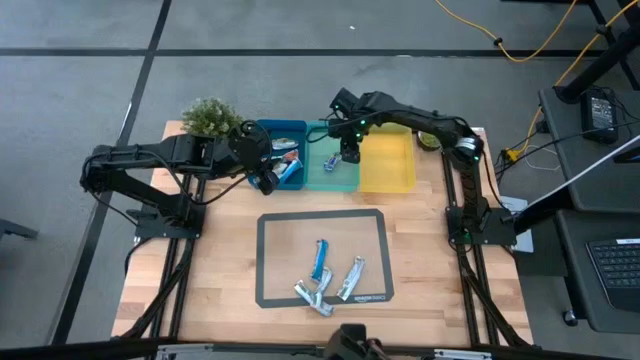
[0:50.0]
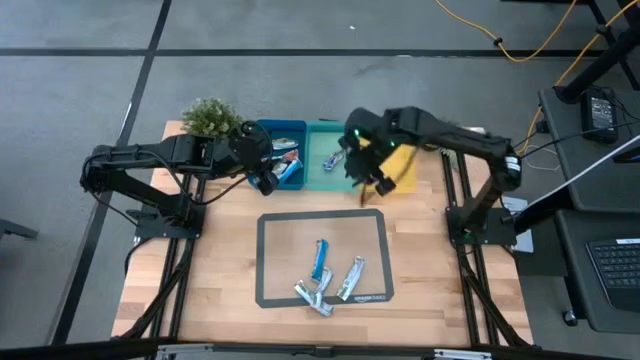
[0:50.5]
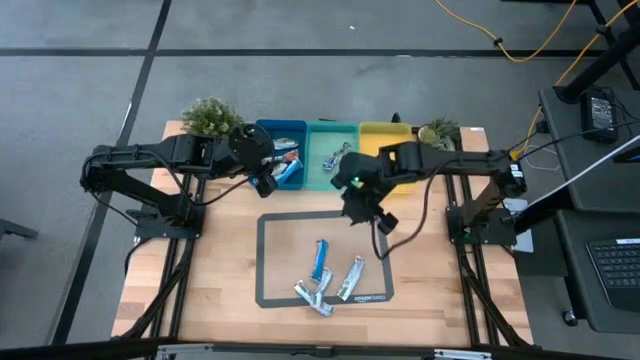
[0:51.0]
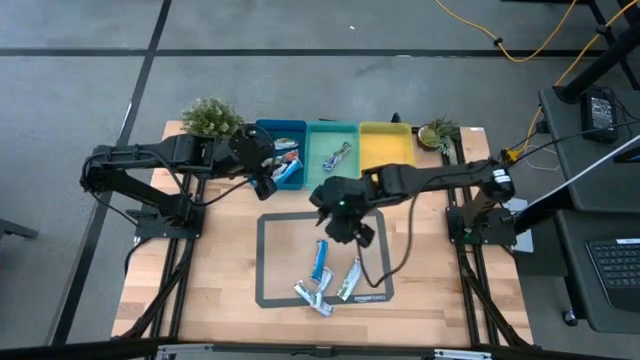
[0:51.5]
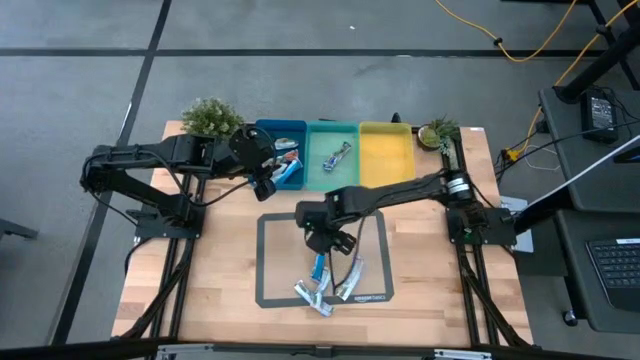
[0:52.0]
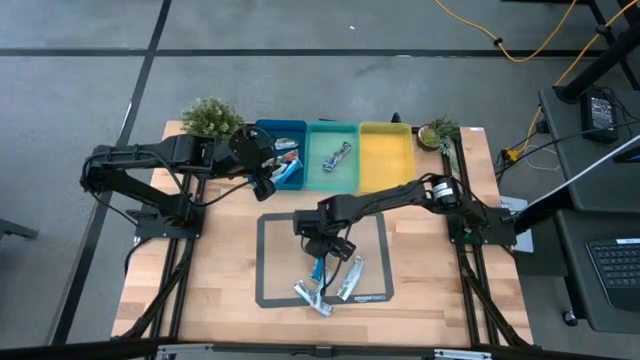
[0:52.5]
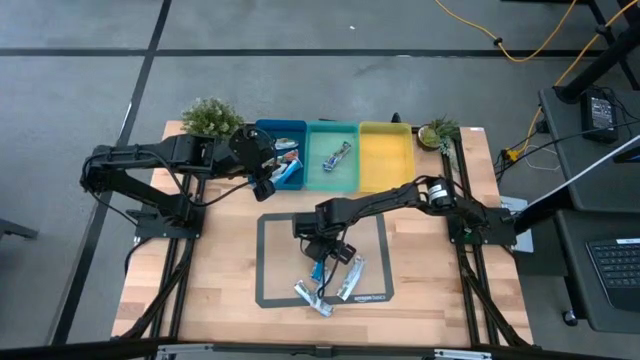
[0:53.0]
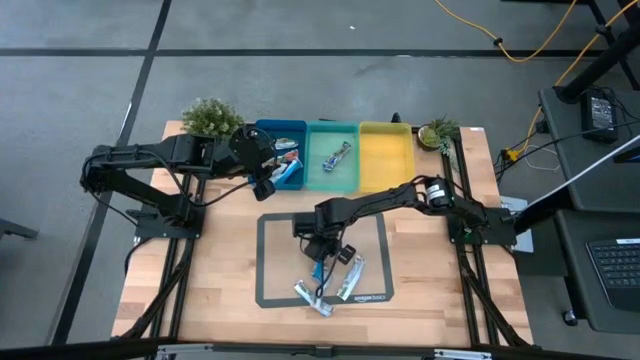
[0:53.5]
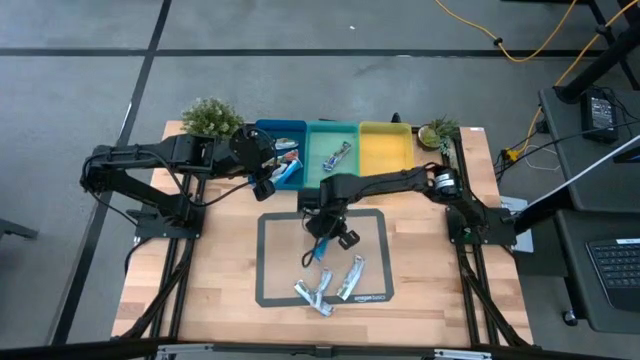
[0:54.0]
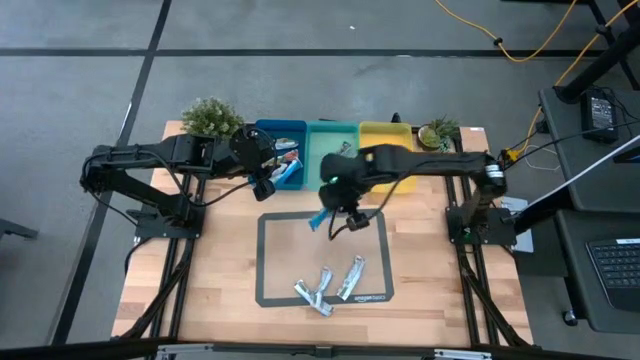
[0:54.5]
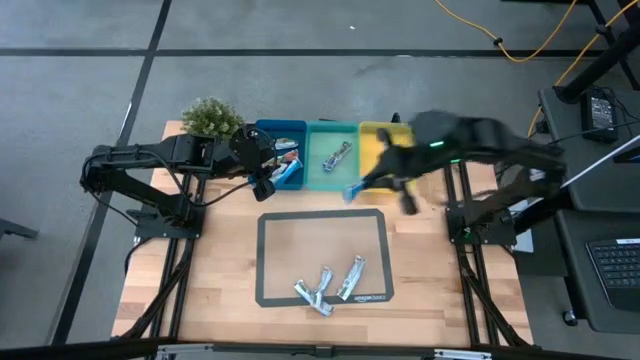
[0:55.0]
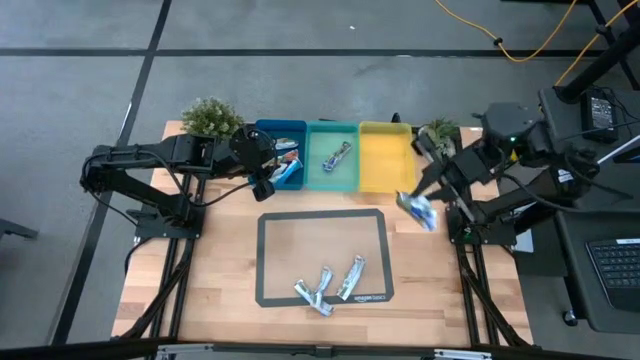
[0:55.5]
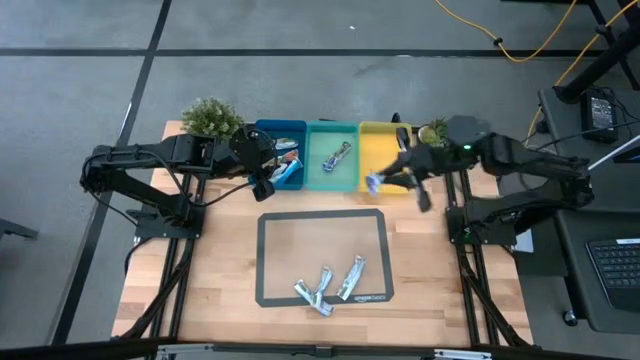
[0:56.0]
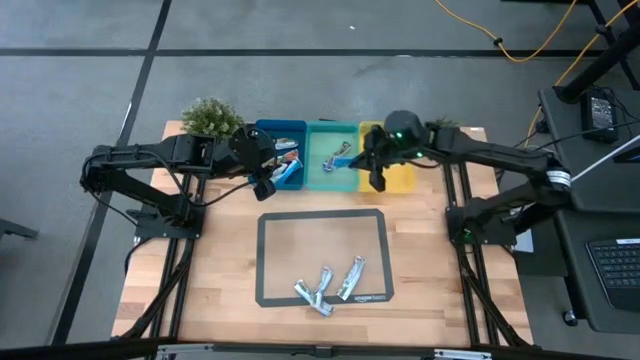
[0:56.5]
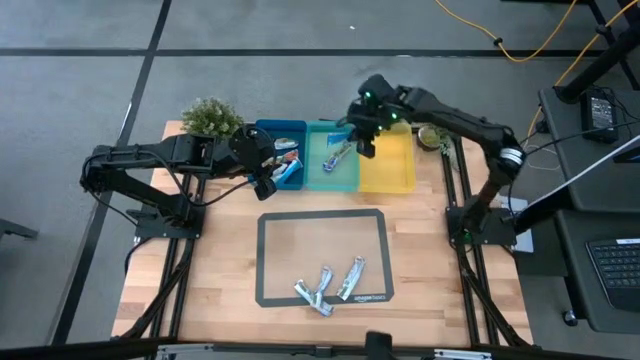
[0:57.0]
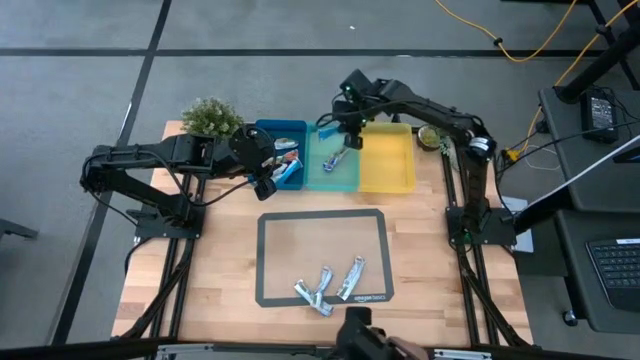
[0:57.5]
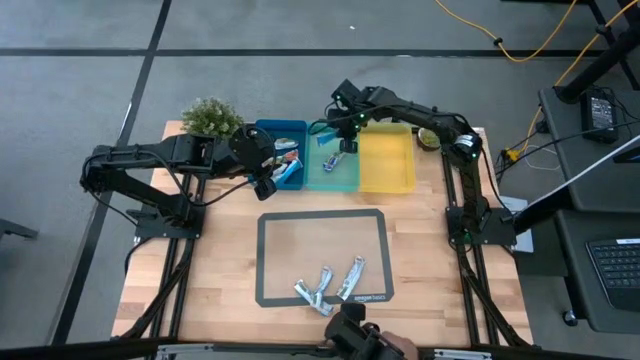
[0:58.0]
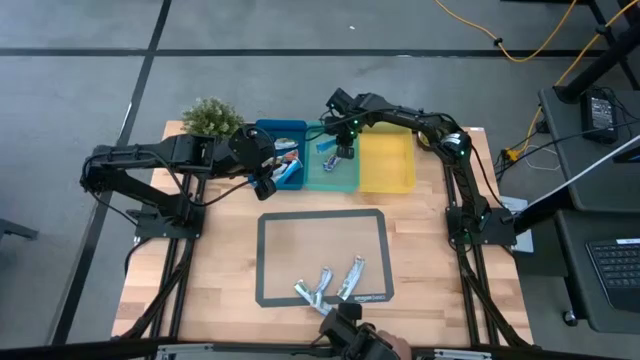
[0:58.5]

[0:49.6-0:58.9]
Task: Pick and place Granola Bars by type
Put the blue granola bar into the green bin

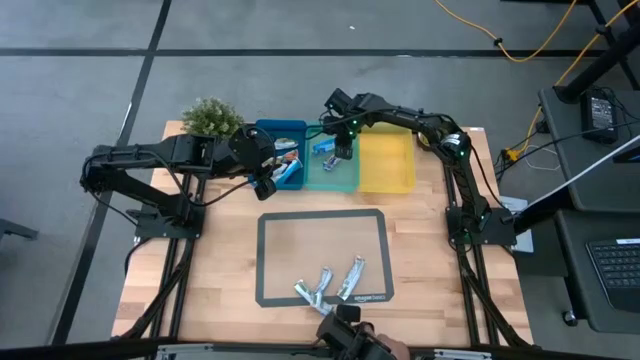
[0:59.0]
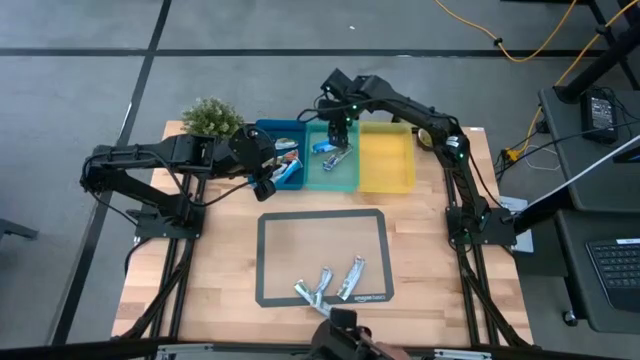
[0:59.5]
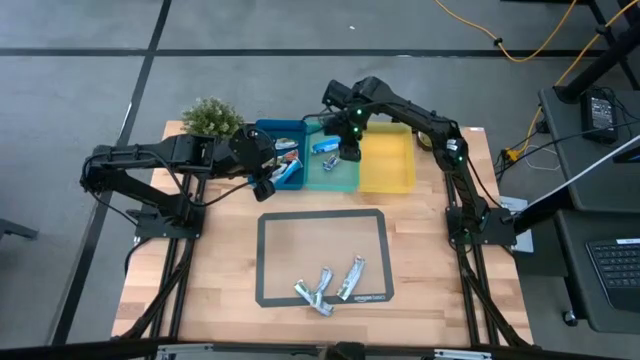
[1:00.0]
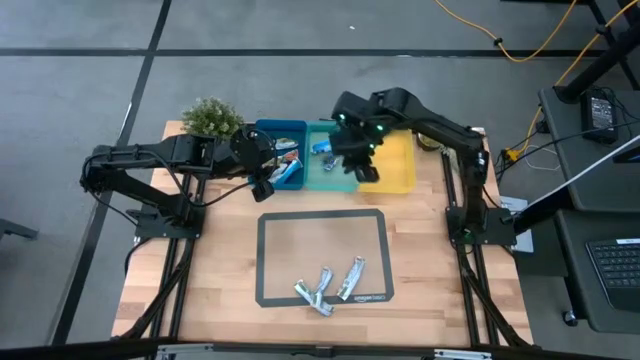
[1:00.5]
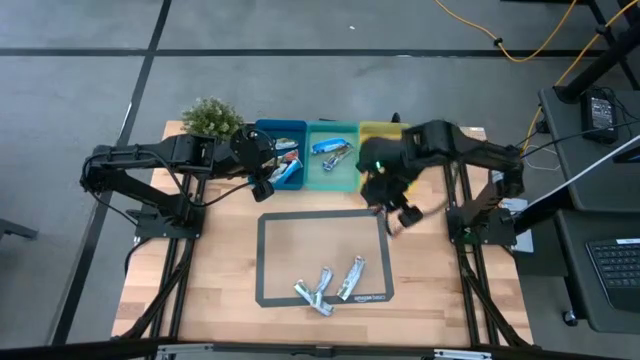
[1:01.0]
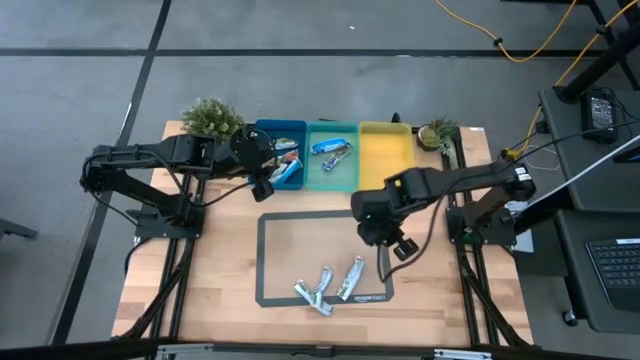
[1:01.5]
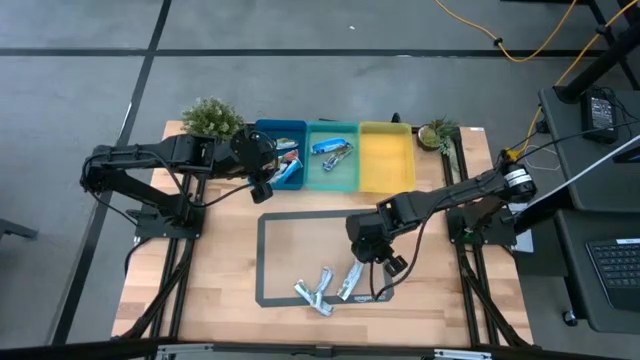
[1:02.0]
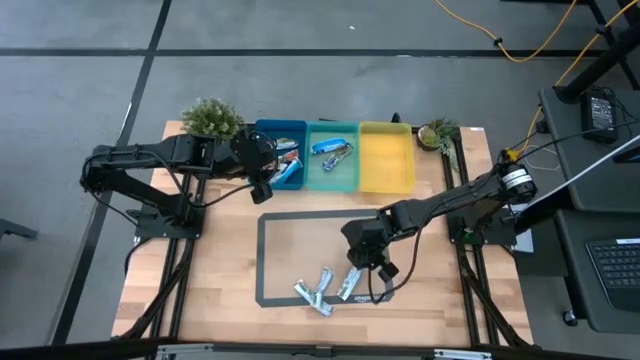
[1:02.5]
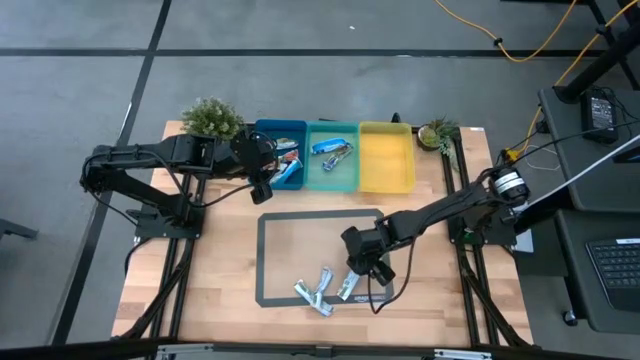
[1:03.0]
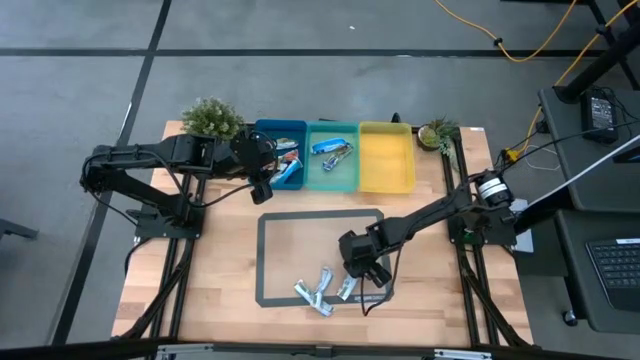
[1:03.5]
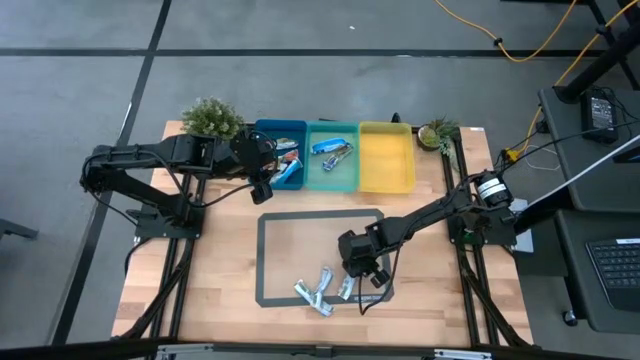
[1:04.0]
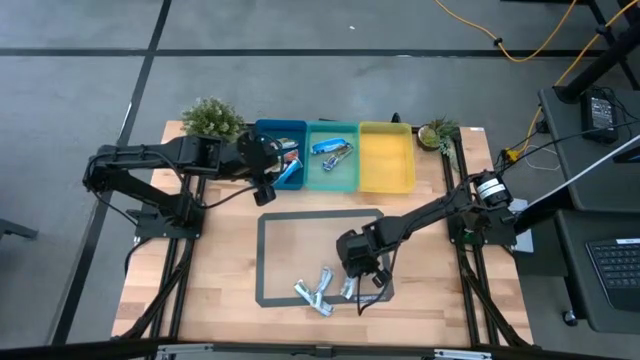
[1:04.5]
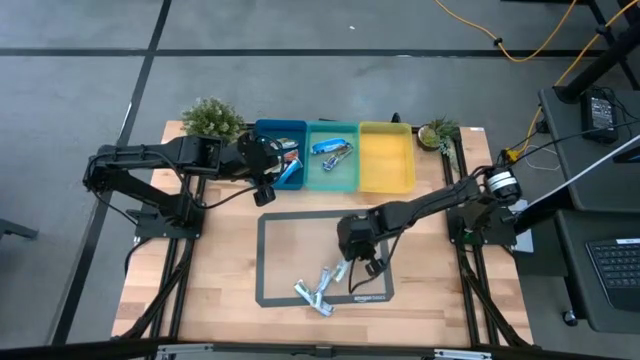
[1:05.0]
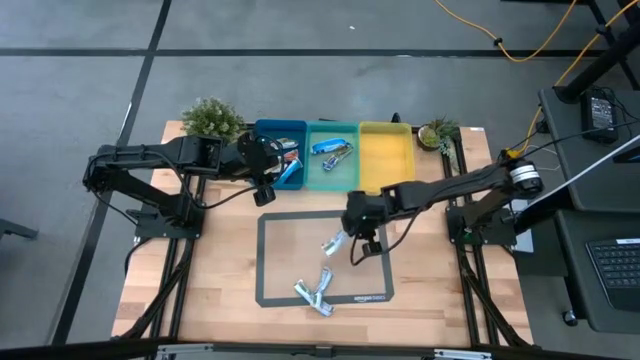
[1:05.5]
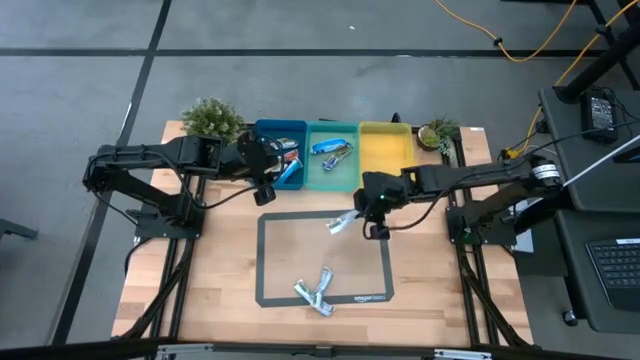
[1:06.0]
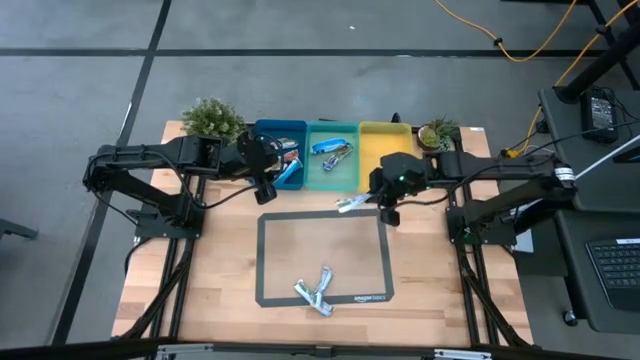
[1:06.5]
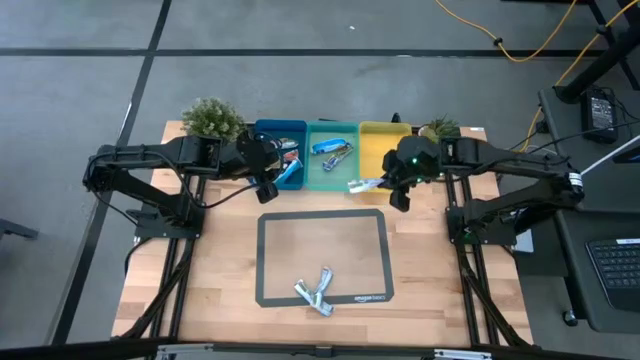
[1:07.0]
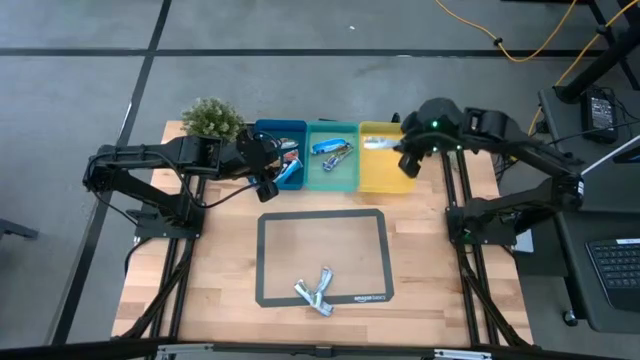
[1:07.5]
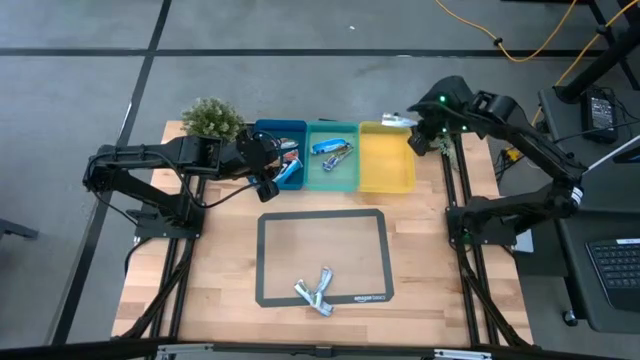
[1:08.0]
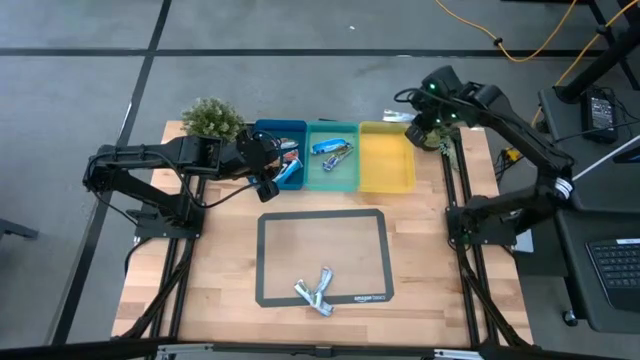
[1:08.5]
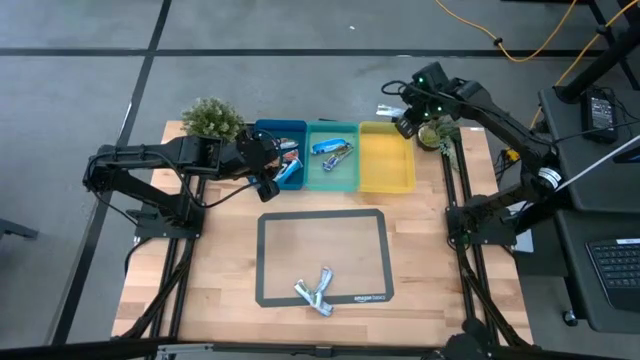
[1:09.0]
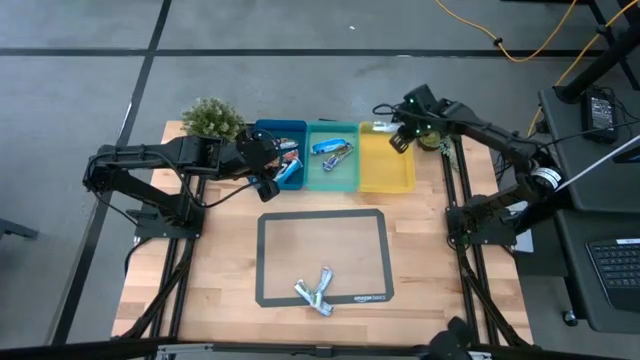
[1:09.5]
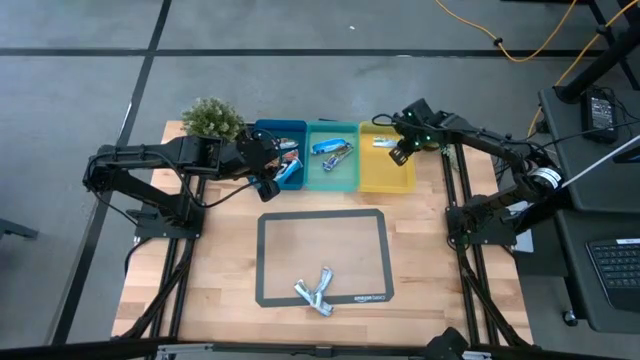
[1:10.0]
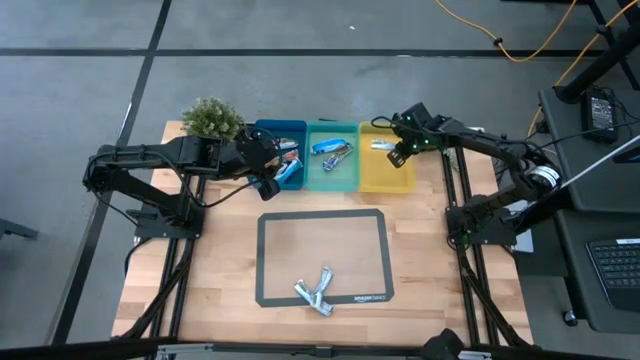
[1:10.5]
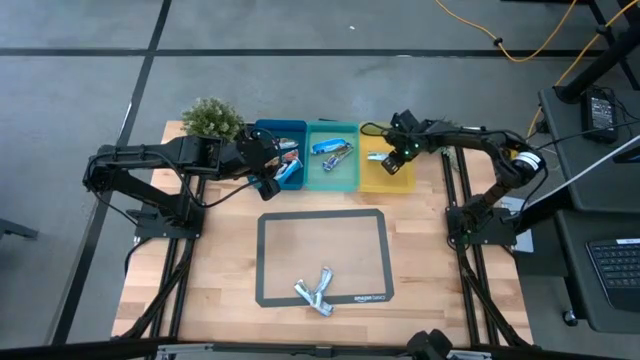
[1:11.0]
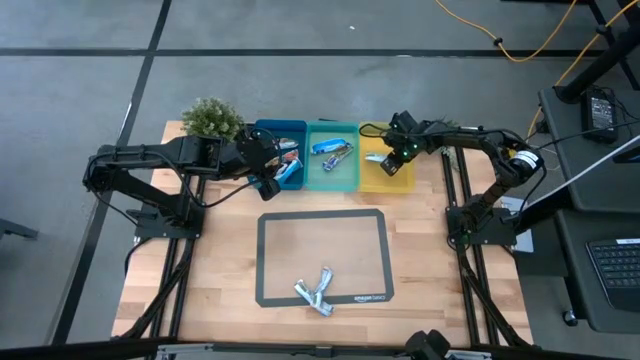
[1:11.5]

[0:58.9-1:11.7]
Put the right yellow granola bar into the yellow bin
